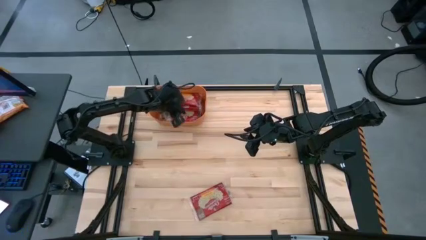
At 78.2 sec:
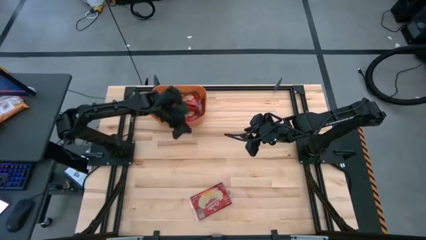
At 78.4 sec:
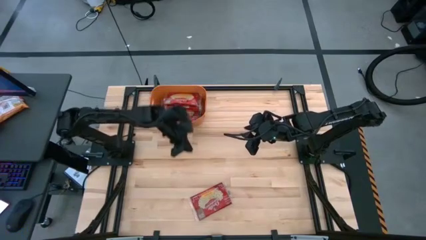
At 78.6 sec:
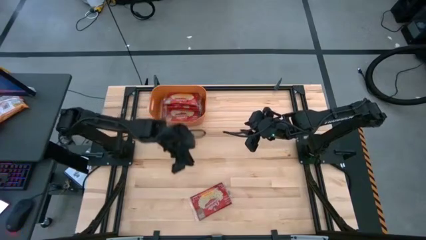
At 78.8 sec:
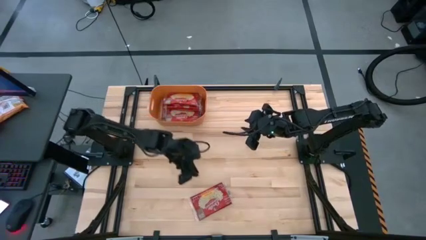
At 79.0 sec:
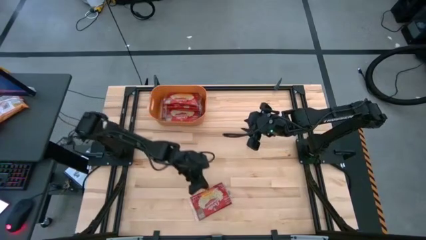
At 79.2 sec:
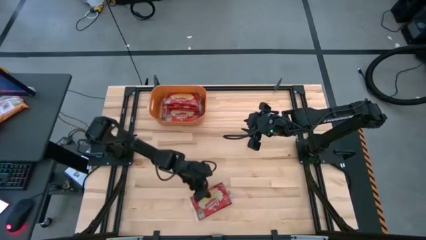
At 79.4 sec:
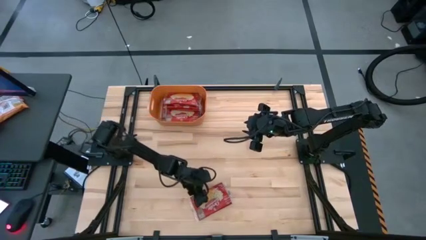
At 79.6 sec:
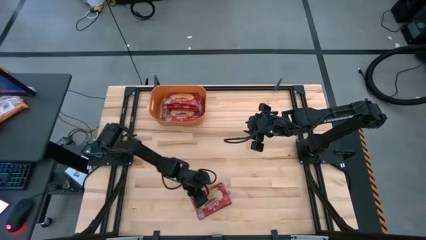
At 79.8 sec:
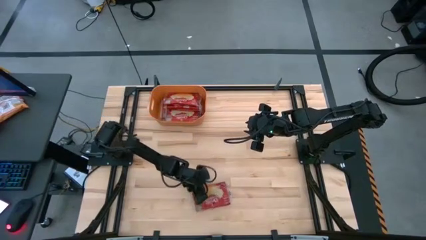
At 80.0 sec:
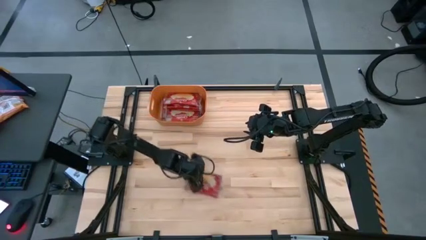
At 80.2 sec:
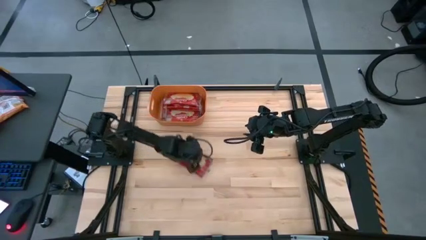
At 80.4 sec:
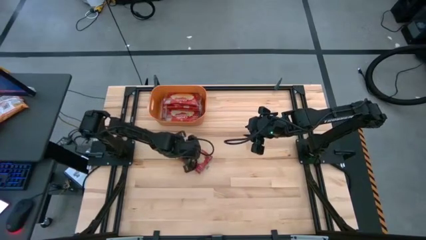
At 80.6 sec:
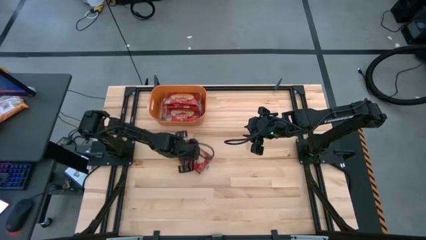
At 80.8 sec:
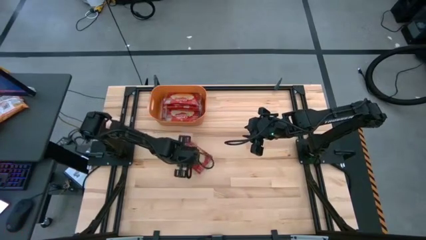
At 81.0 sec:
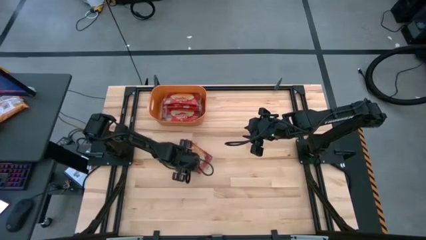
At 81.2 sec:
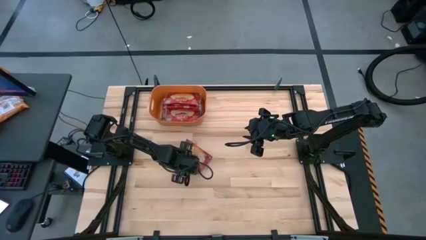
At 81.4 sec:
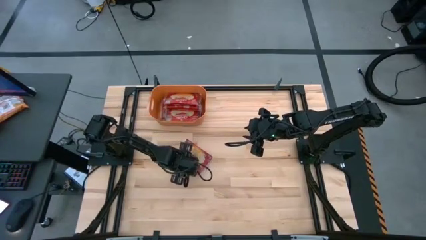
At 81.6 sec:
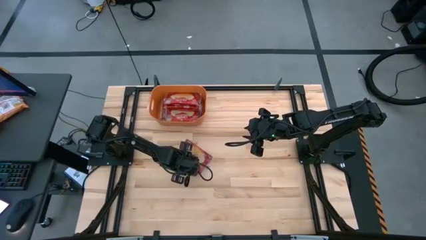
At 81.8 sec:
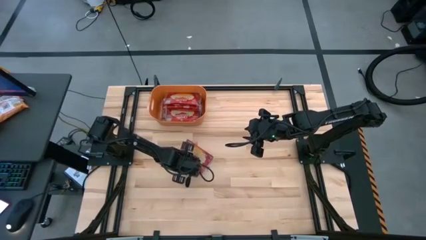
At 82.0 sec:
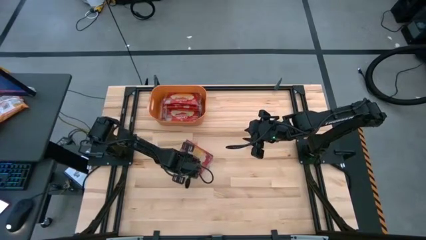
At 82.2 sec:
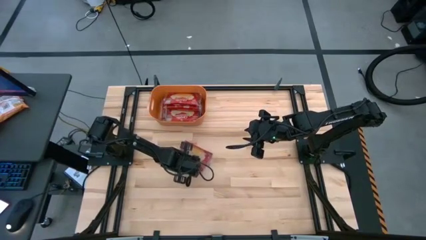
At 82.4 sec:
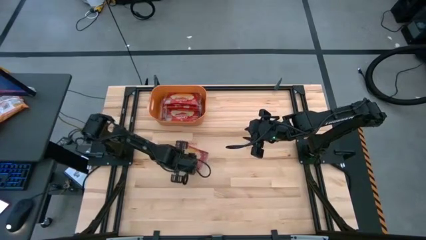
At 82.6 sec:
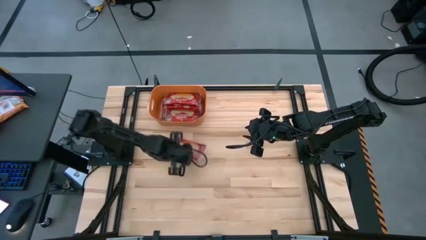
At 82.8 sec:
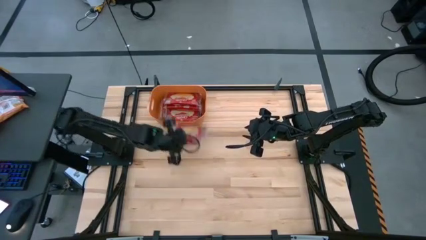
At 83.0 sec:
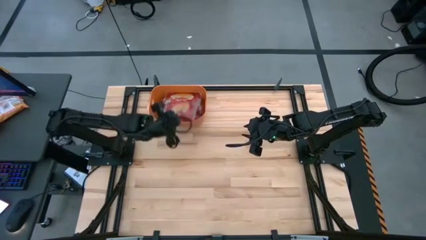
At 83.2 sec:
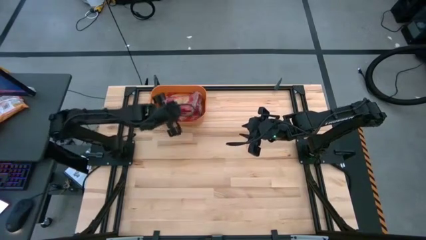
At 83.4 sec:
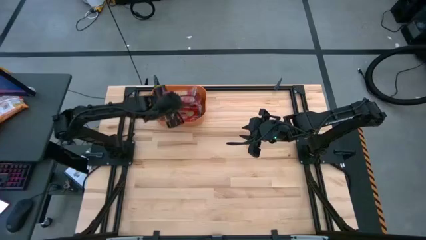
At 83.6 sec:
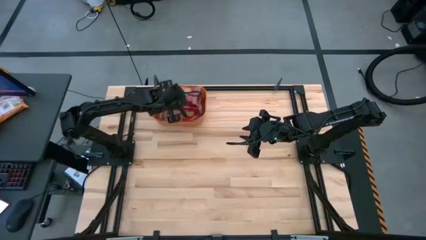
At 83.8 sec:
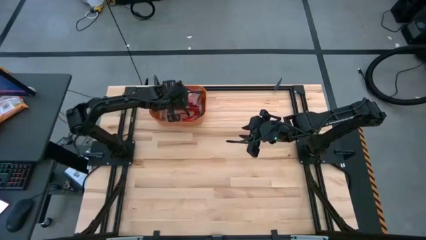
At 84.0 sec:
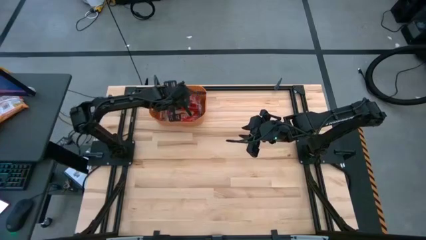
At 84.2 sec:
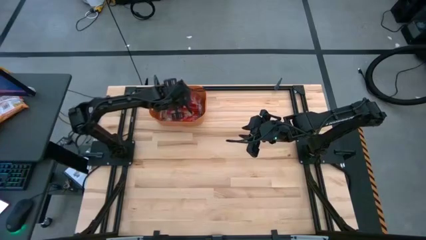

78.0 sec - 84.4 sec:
Task: Sort popcorn bags into baskets
Put the red popcorn bag into the orange bin

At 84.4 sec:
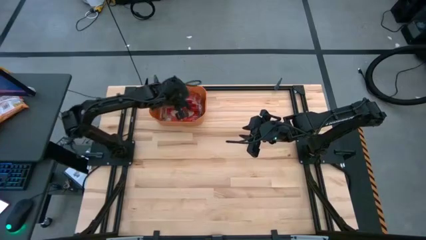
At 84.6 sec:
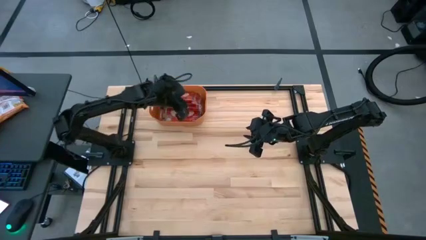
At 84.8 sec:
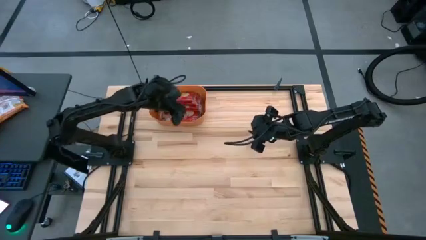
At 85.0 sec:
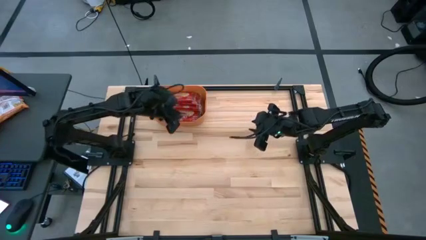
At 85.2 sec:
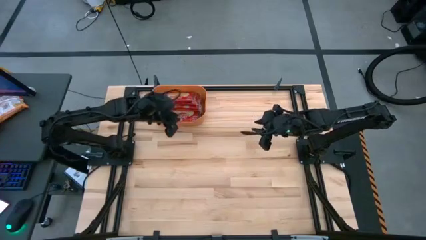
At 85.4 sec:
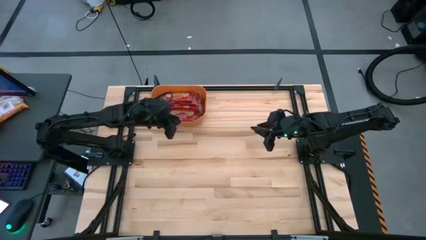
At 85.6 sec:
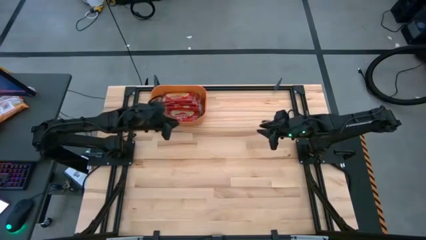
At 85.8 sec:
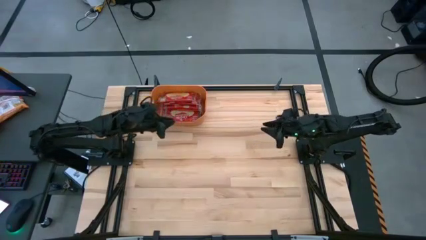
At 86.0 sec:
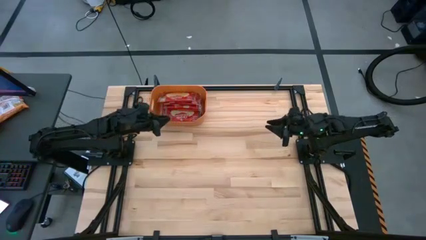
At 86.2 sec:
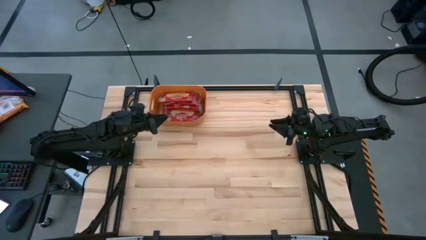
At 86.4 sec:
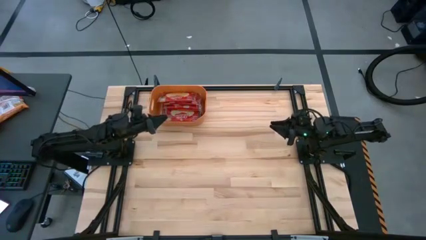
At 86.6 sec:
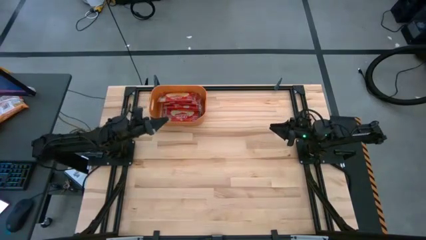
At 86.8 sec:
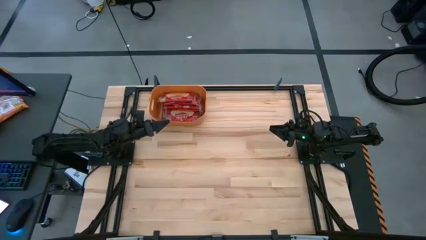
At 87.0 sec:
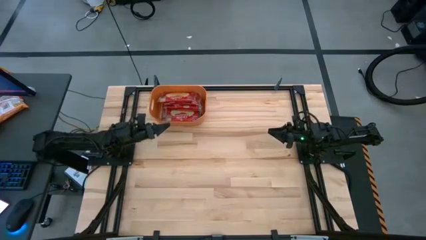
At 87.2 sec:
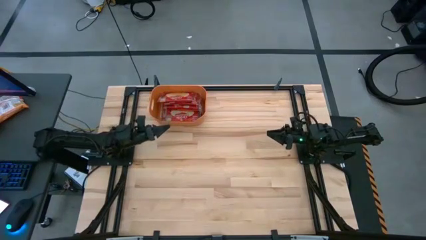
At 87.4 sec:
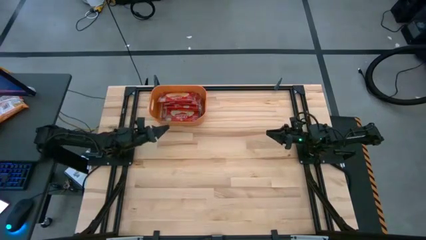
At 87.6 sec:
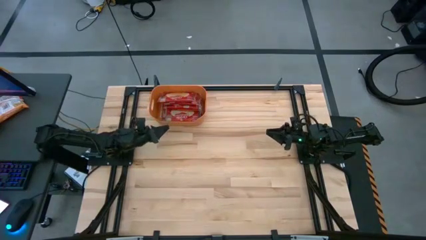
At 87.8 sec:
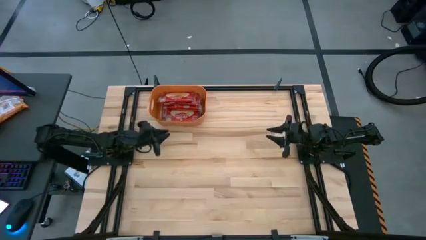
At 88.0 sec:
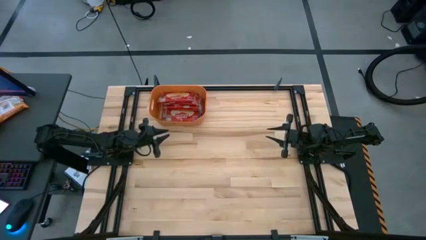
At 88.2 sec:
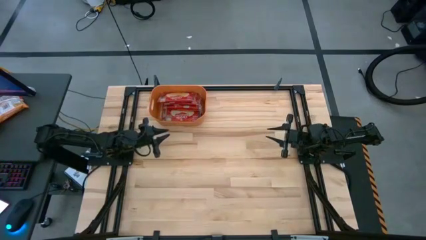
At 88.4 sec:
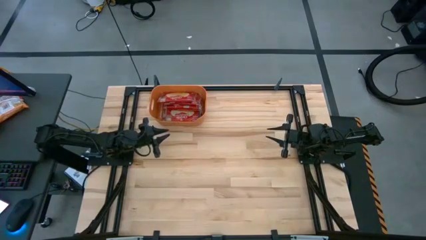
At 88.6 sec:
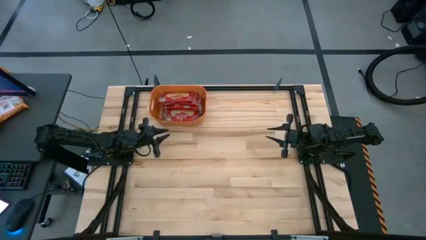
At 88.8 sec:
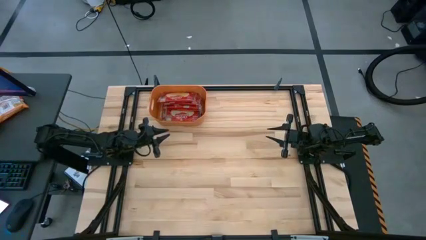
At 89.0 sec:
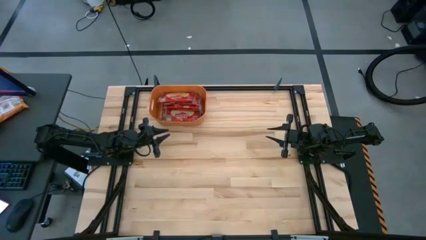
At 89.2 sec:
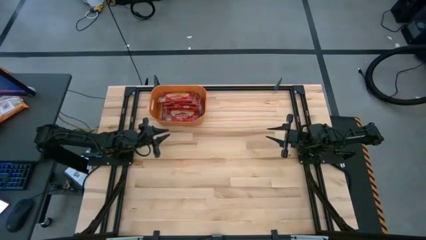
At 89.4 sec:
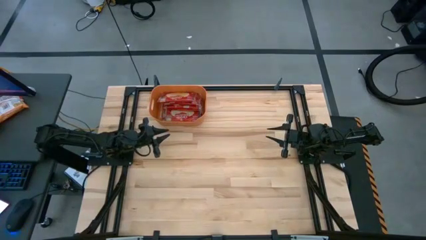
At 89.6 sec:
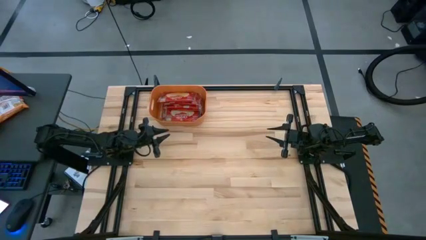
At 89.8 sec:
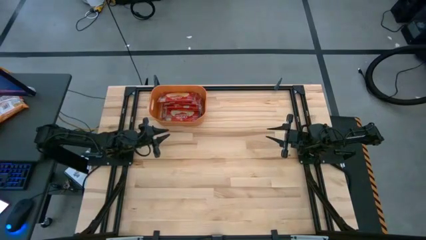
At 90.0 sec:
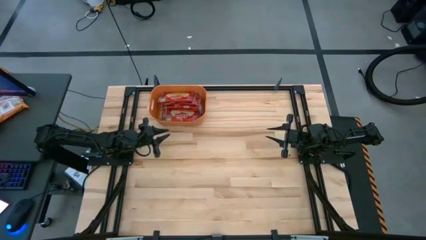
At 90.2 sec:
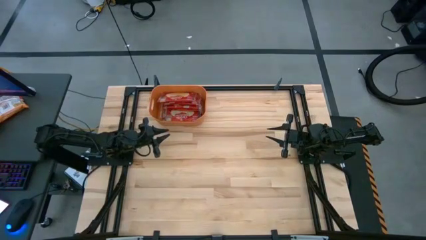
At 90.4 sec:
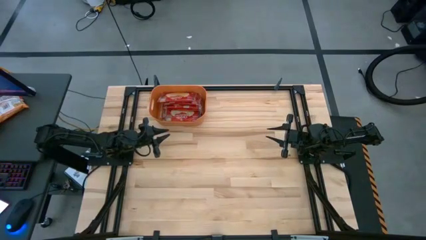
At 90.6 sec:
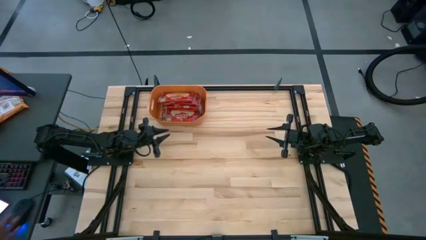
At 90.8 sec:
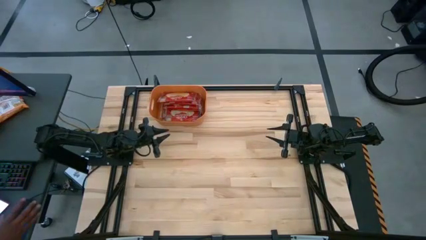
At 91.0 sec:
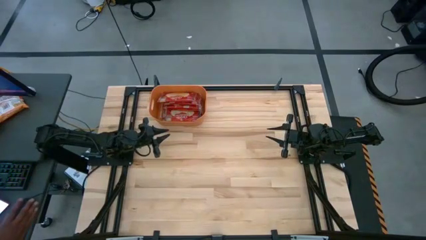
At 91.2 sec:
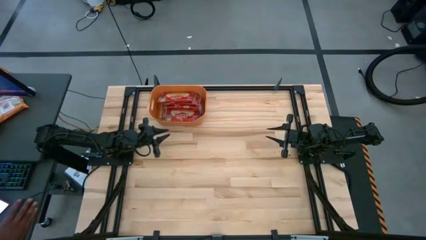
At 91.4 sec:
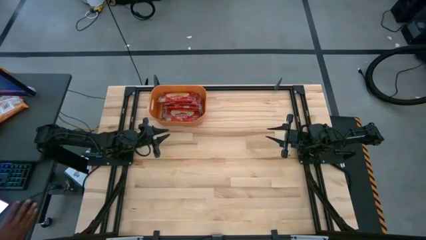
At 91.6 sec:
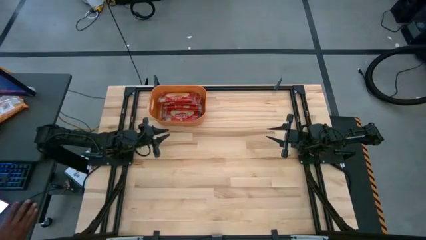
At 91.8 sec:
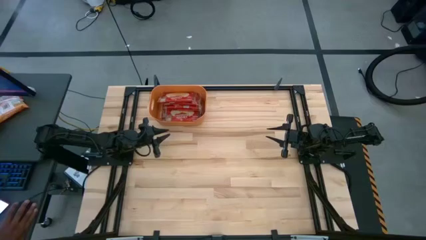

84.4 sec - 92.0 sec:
Return to Home Position

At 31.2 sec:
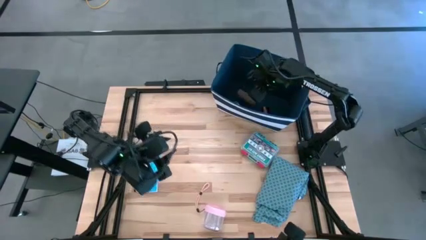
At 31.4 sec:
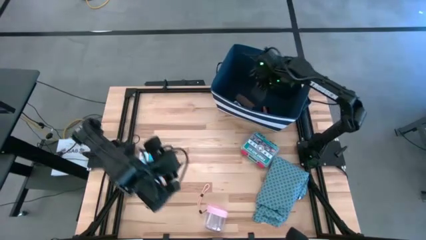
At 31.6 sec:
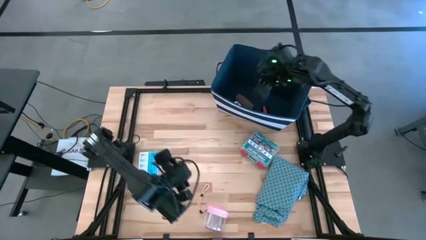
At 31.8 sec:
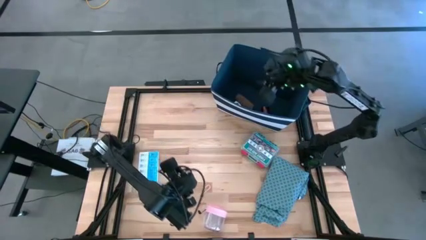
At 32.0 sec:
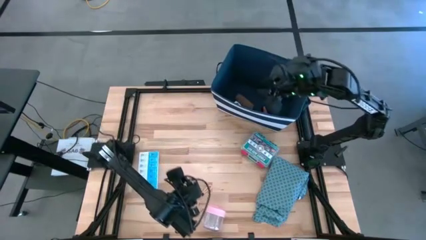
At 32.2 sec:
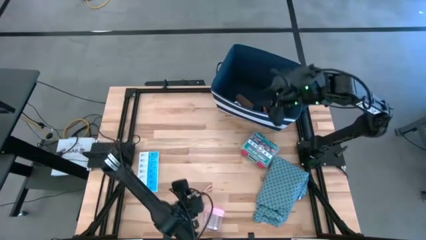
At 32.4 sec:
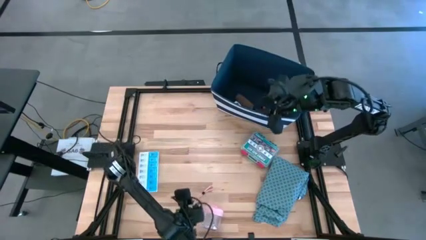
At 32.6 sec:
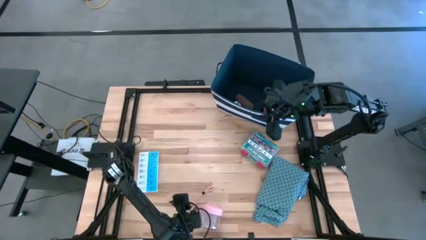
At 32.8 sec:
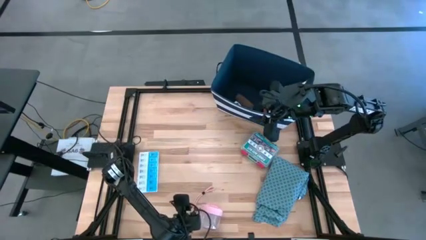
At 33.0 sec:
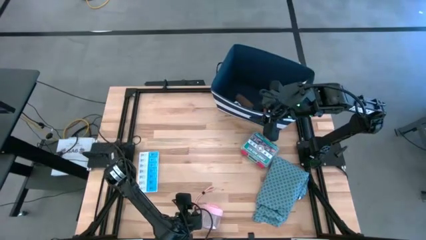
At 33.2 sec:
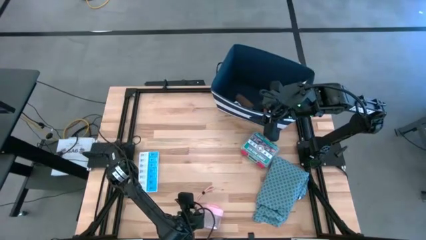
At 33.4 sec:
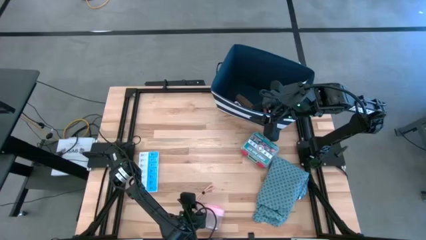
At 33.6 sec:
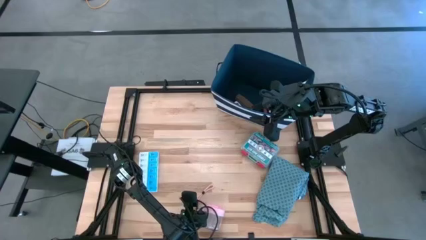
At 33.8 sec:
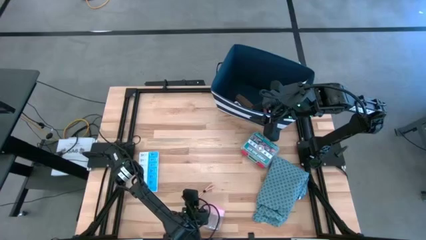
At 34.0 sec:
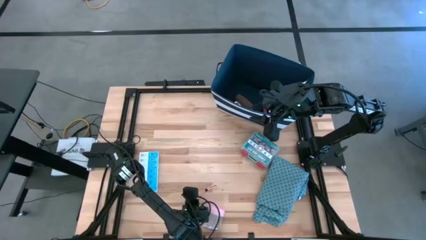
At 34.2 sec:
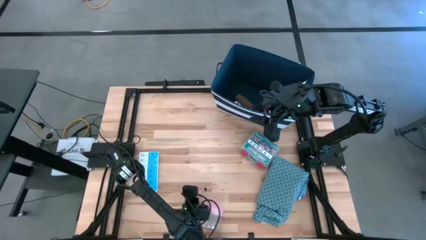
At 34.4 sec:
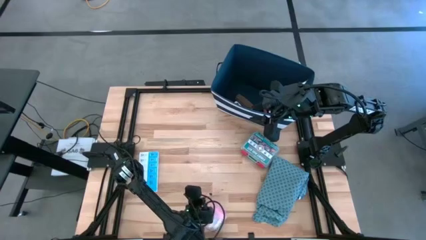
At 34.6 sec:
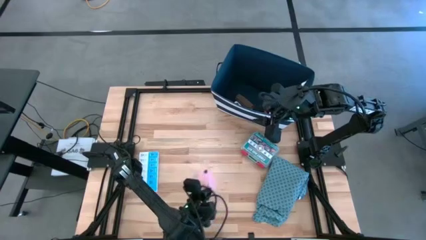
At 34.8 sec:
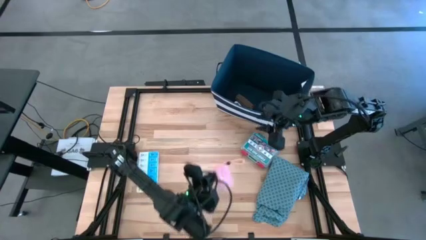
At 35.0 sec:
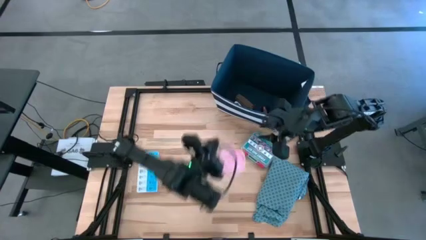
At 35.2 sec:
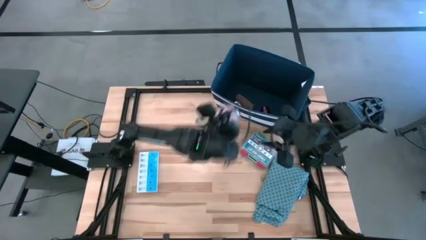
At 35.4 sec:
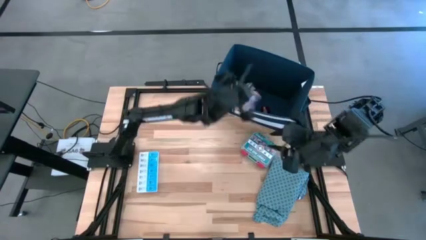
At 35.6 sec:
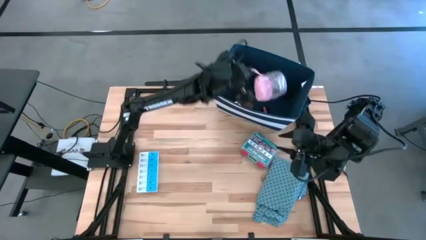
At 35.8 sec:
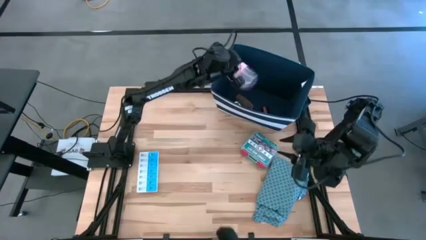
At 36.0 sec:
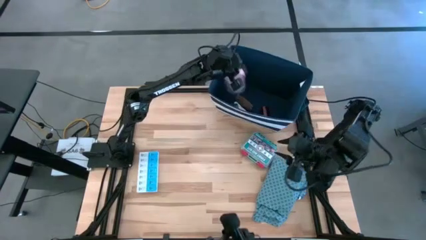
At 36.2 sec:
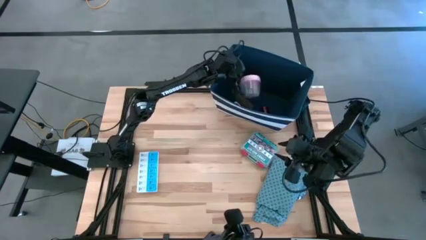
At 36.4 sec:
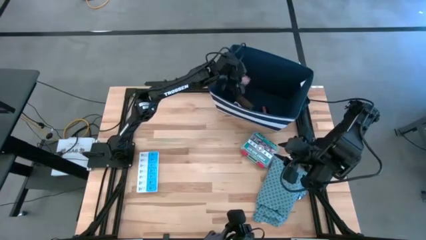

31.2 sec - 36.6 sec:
Task: Pick & place medical supplies in basket/bin
Put the pink pill organizer into the white bin
